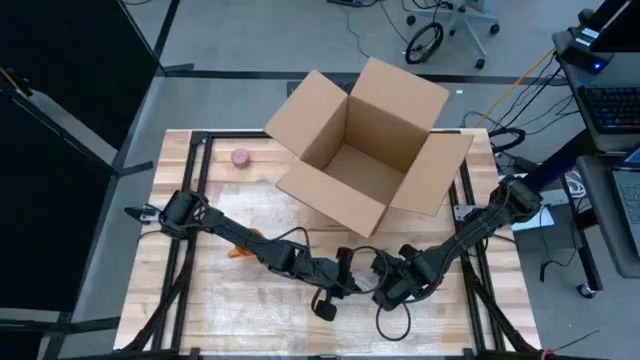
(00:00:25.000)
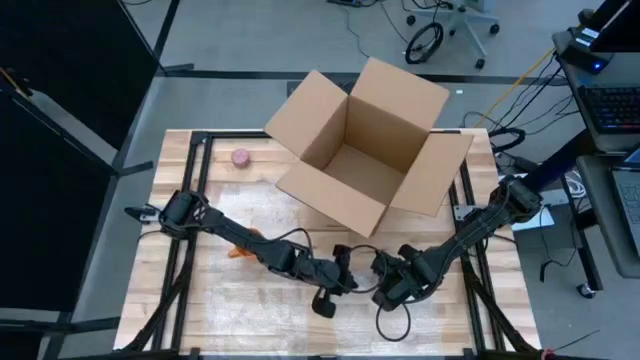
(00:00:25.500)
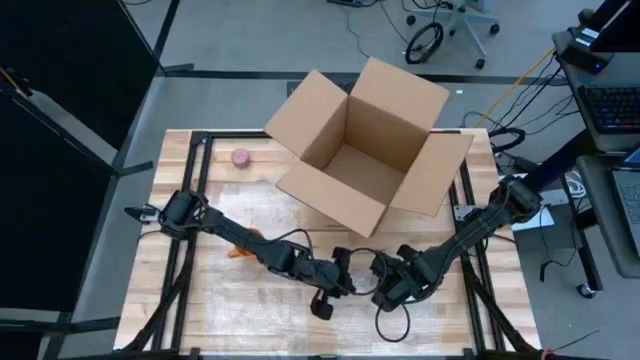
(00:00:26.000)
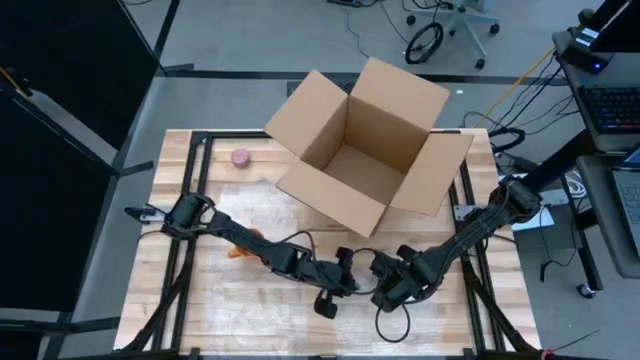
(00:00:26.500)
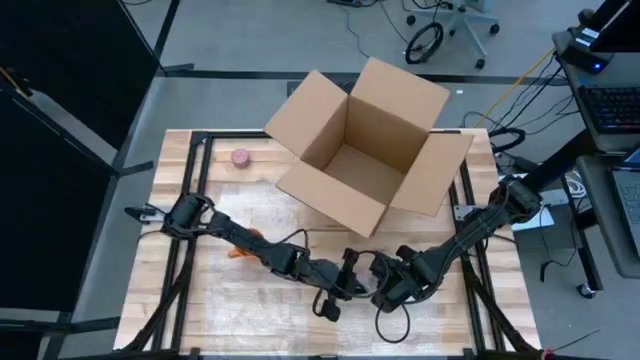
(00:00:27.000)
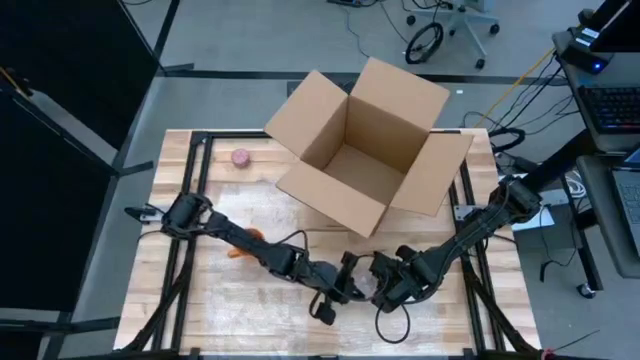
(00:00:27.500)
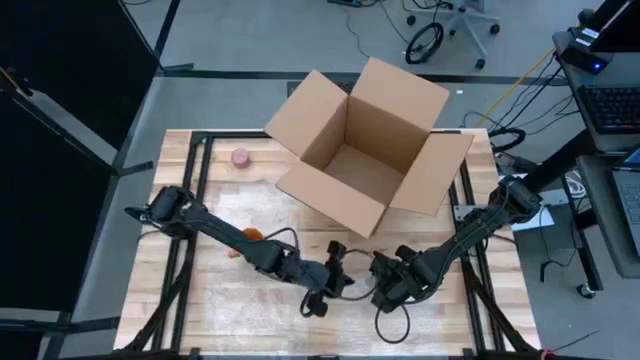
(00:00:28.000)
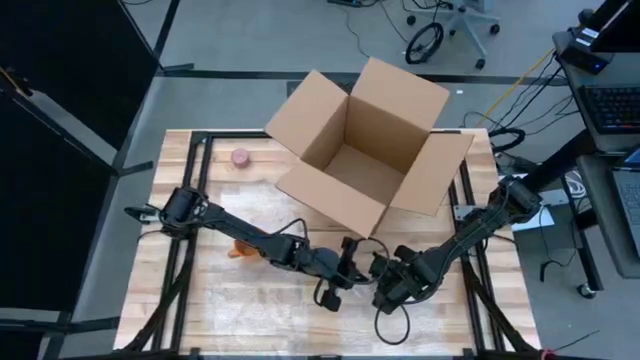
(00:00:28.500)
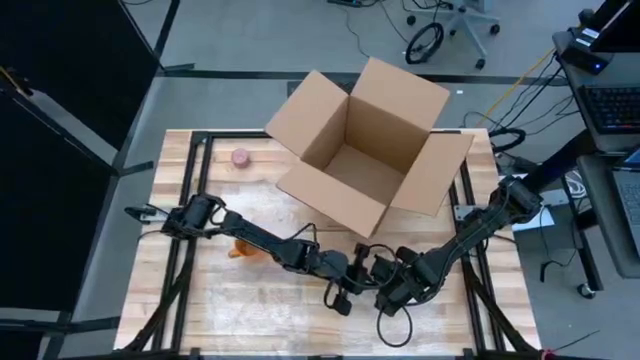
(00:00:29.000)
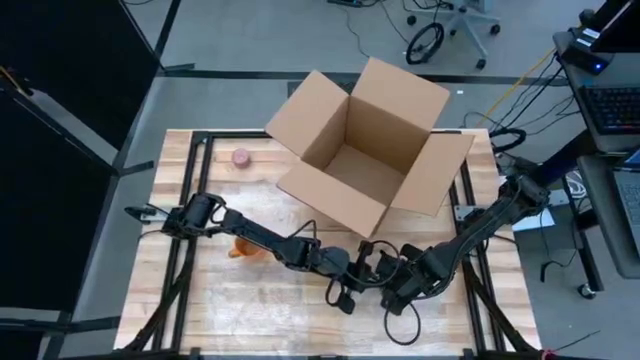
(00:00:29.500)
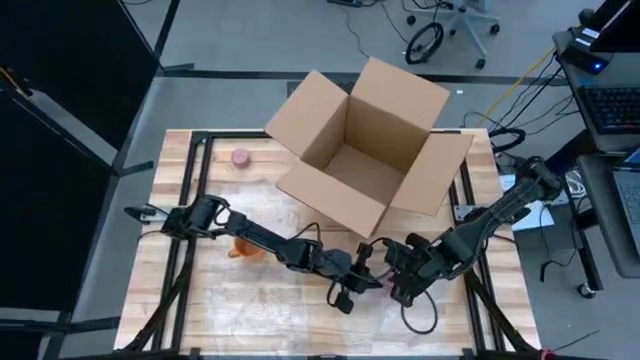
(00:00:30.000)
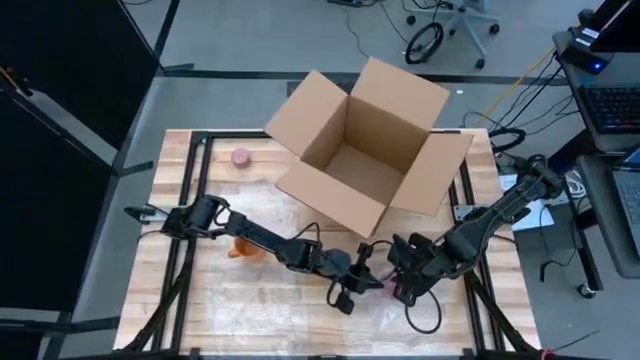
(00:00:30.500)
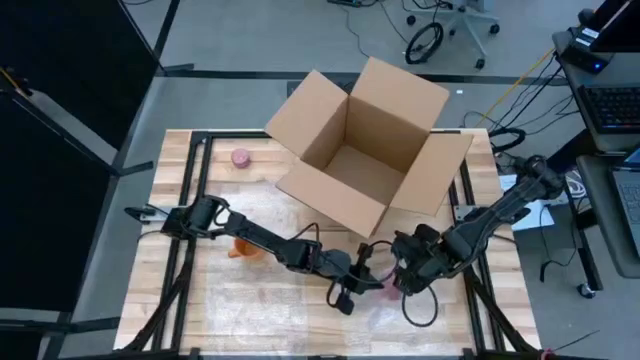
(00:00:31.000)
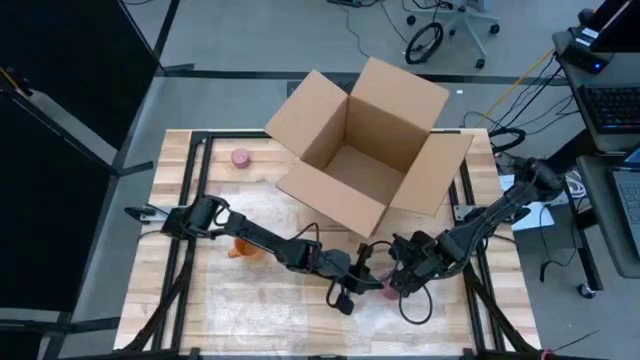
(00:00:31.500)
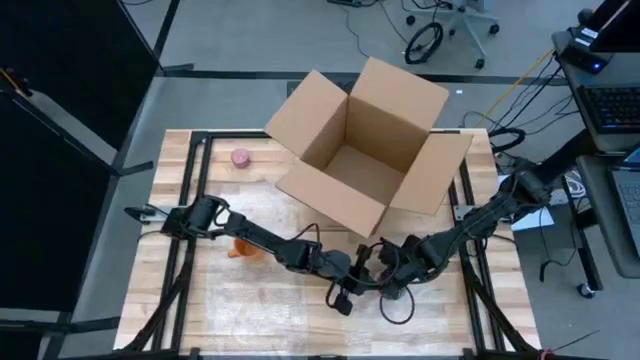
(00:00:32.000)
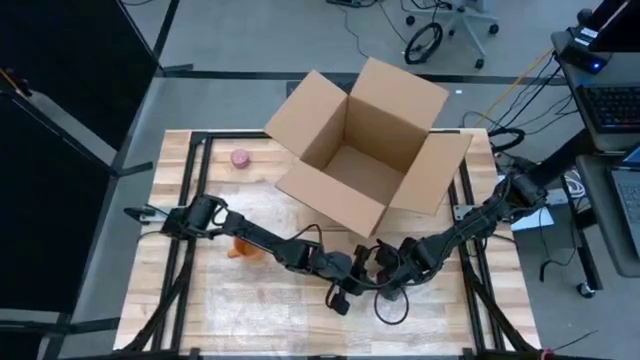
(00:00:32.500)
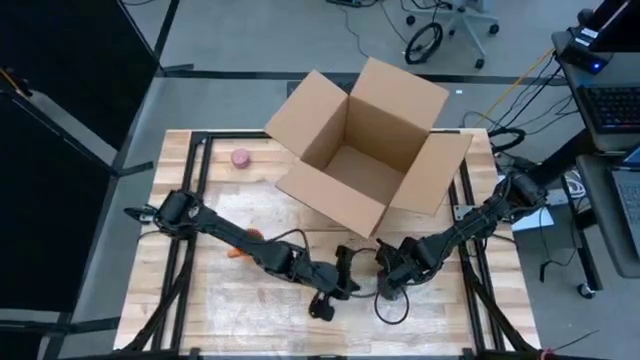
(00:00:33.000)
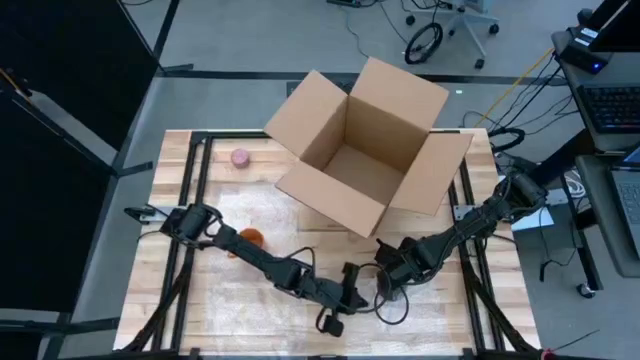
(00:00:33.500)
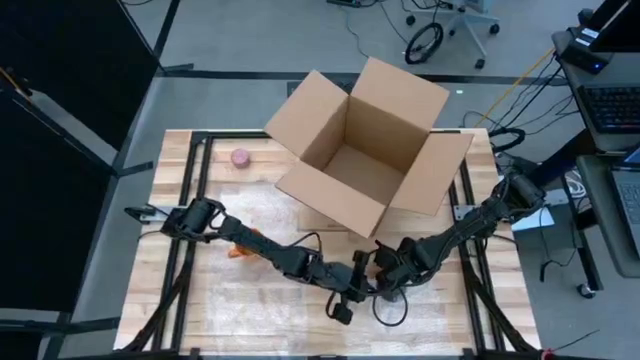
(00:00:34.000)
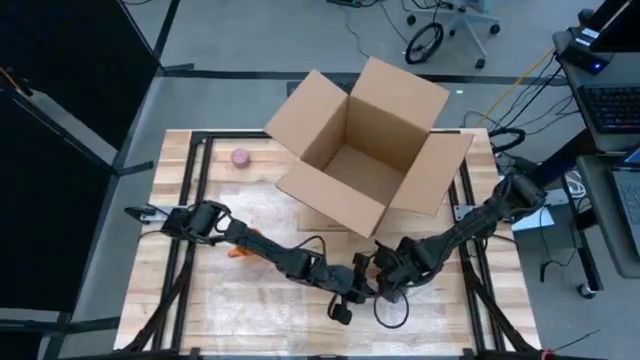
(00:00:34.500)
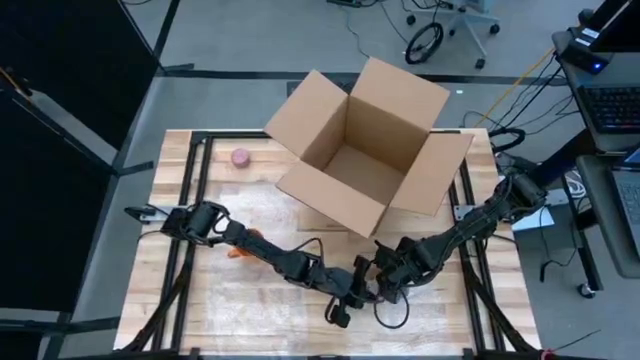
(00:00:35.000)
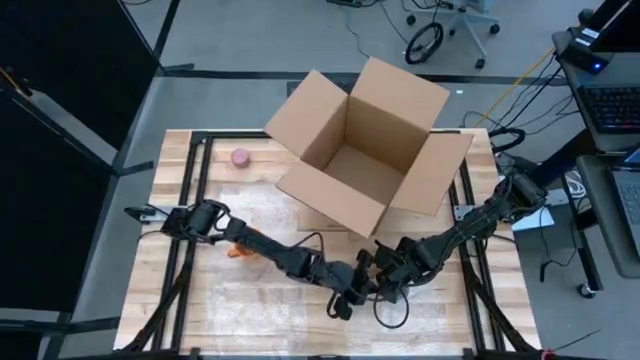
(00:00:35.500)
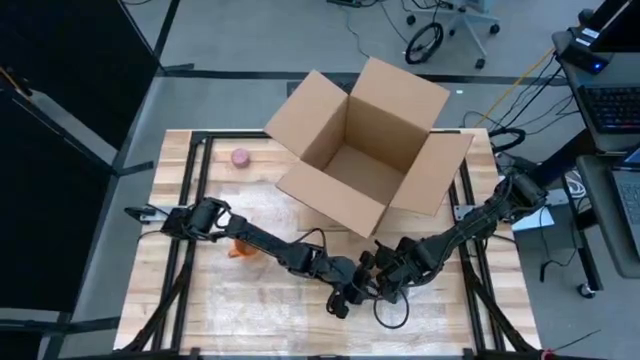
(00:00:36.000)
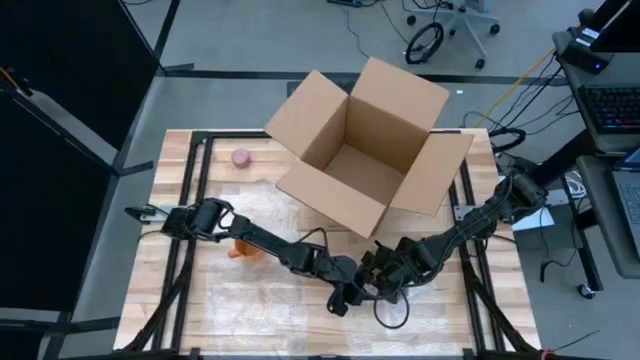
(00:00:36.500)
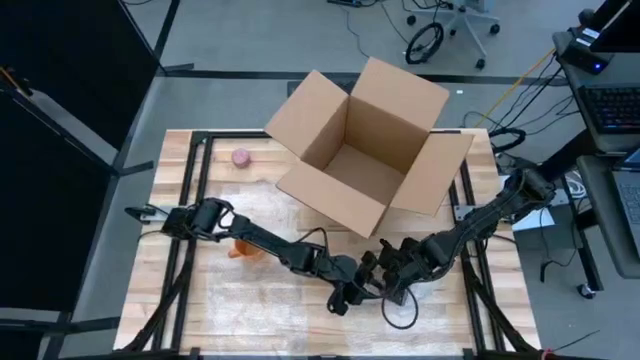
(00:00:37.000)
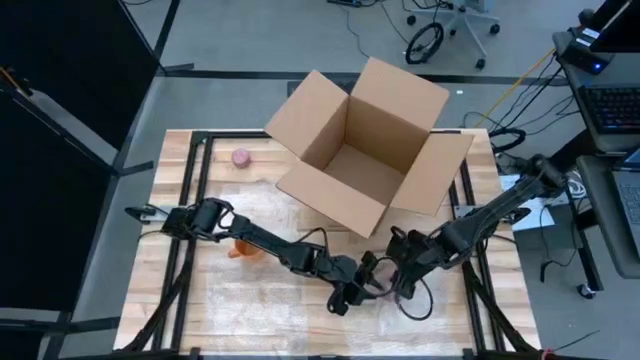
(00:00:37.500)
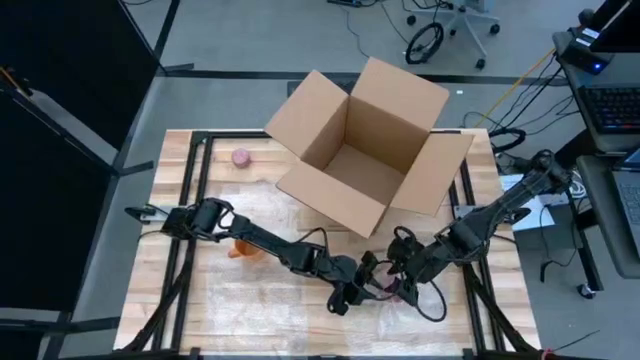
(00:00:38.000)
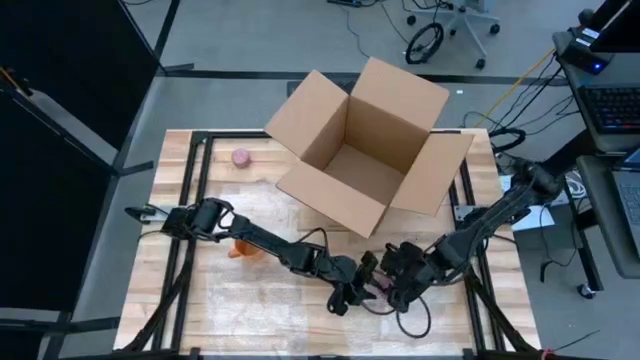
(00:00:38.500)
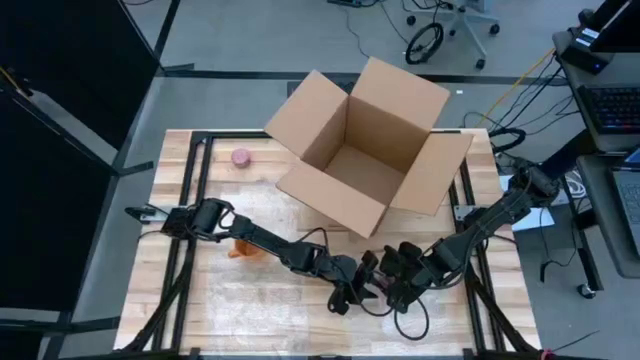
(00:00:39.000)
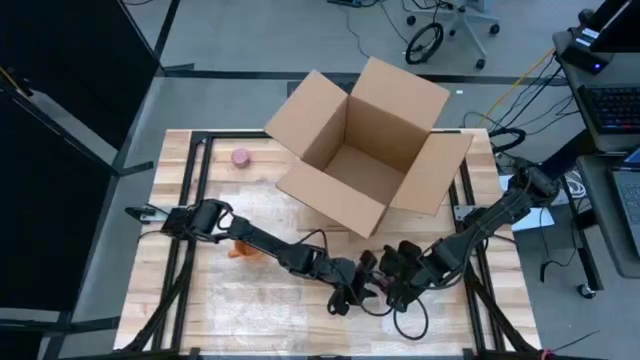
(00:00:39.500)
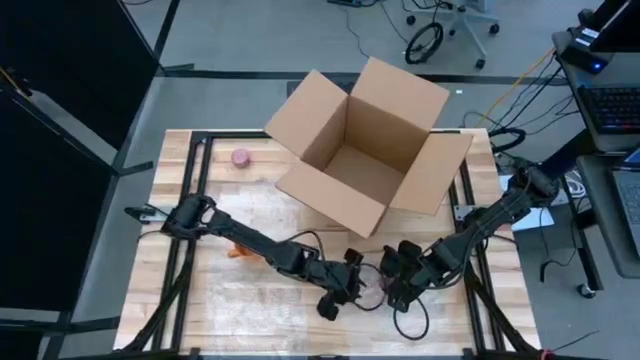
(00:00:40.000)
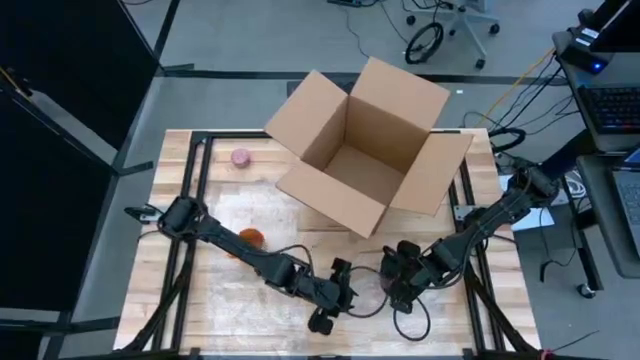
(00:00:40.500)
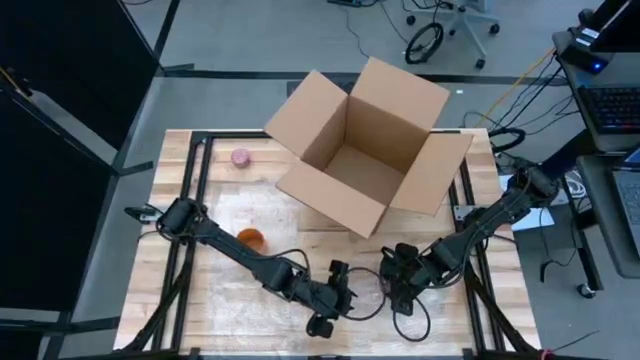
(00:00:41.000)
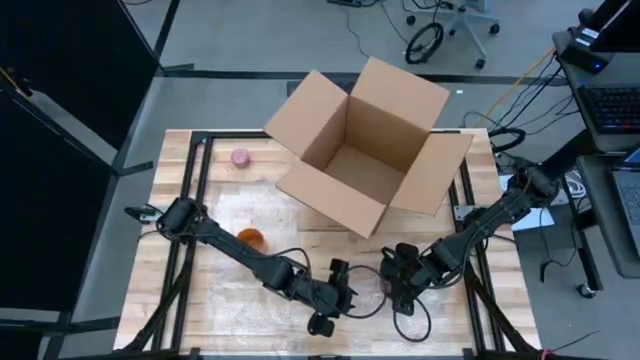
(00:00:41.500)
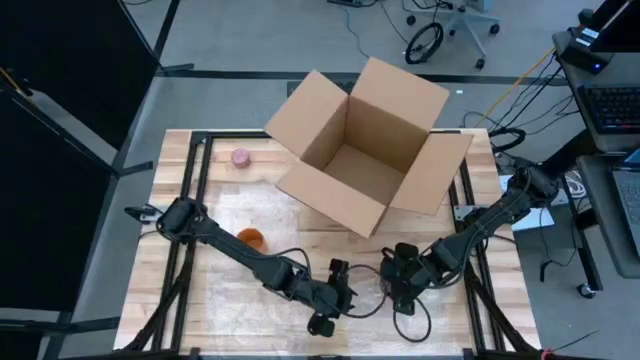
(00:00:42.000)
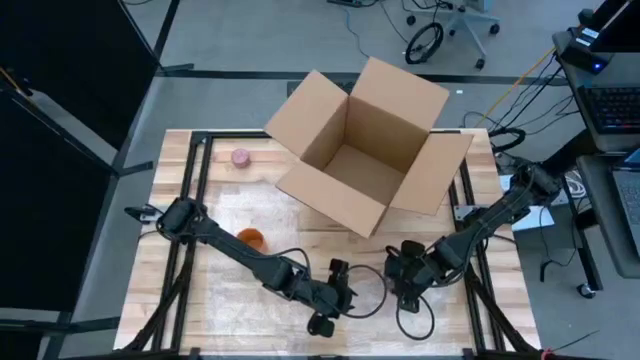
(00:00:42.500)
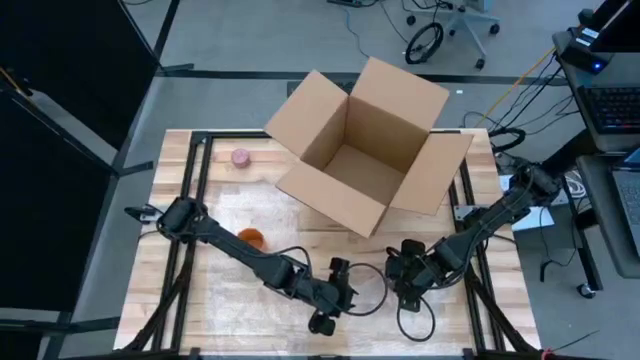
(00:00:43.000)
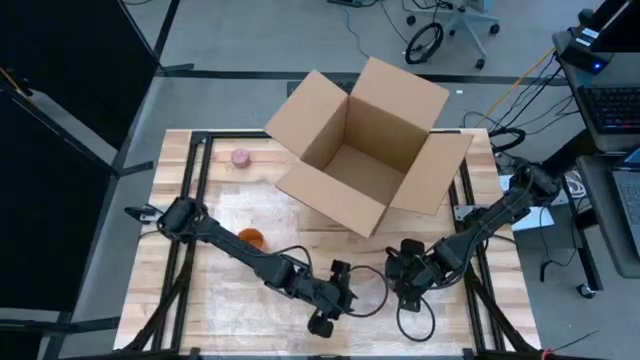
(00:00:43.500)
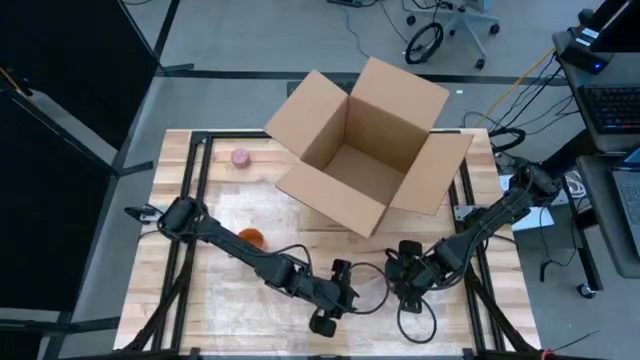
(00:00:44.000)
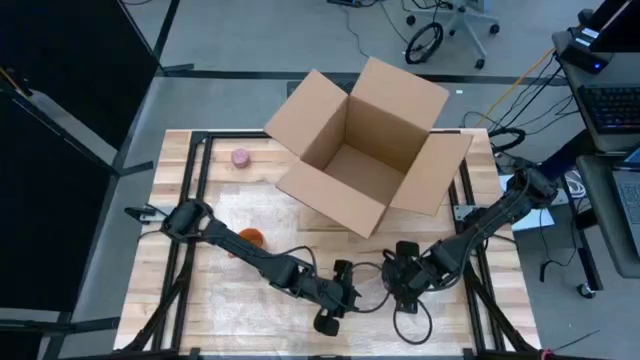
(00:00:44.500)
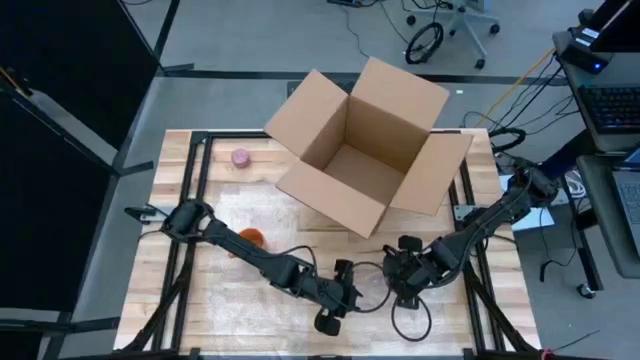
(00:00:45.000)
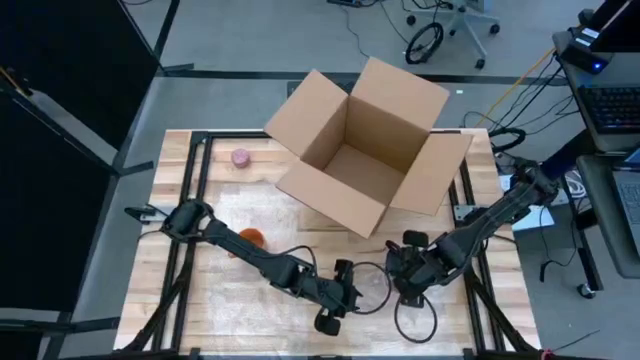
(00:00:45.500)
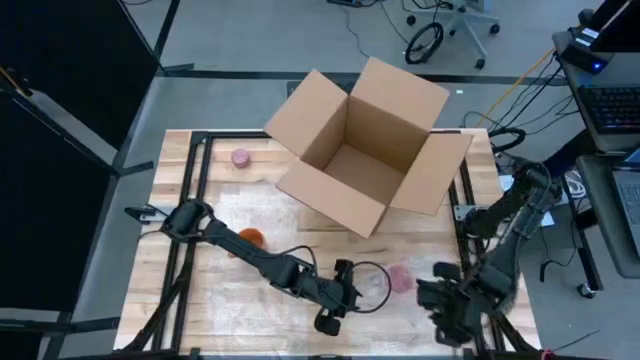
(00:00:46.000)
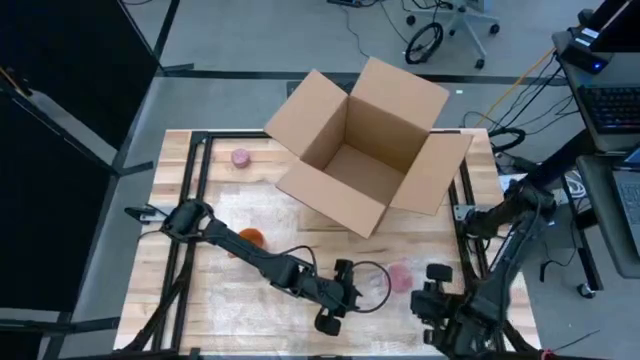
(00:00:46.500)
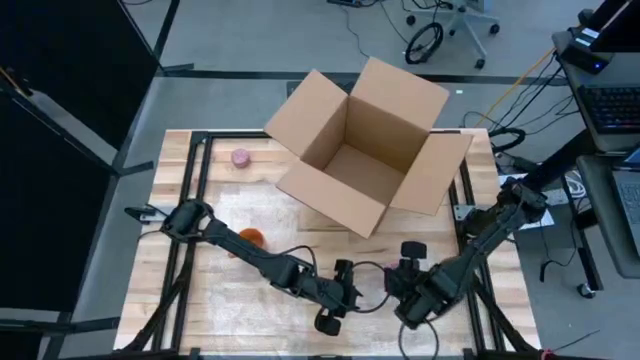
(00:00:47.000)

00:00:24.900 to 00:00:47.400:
Task: wrap mug
Wrap the pink mug in the bubble wrap
